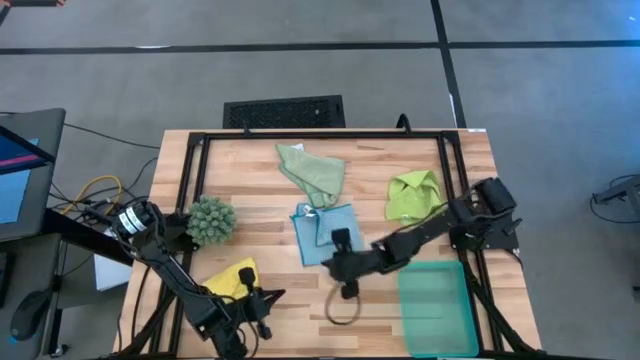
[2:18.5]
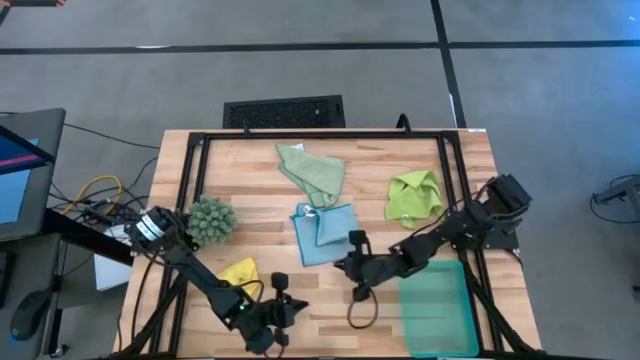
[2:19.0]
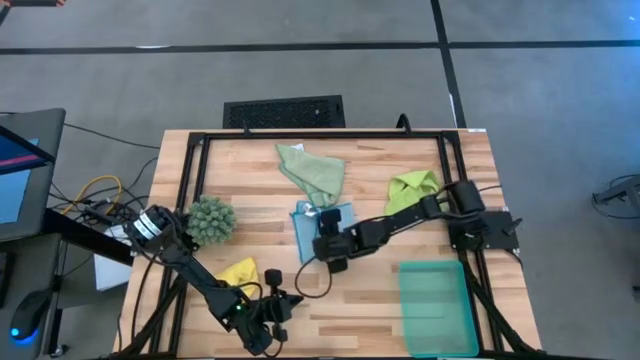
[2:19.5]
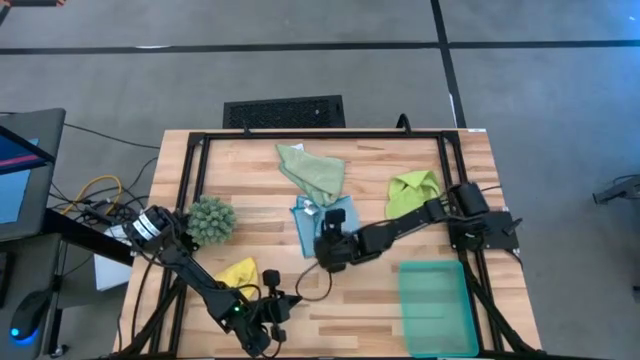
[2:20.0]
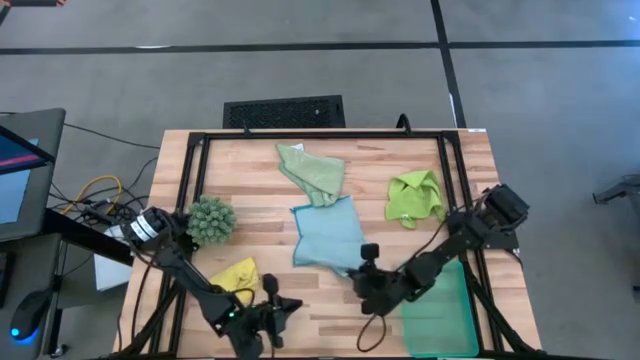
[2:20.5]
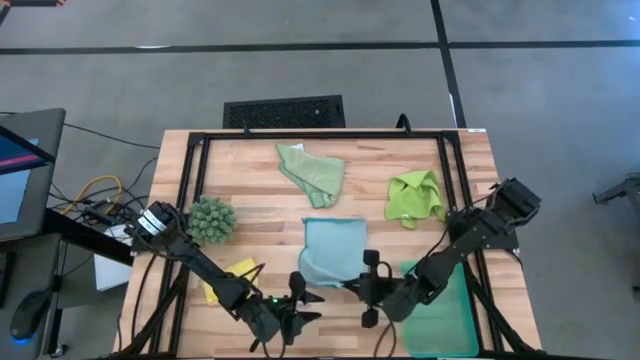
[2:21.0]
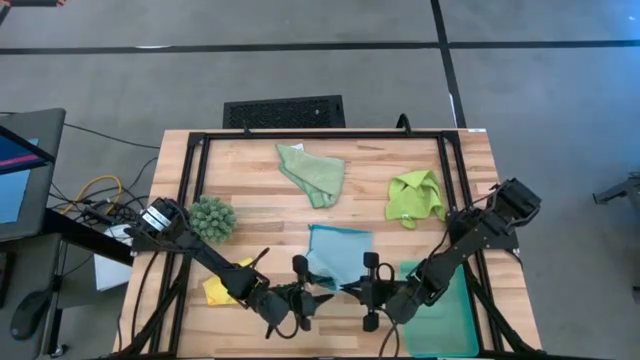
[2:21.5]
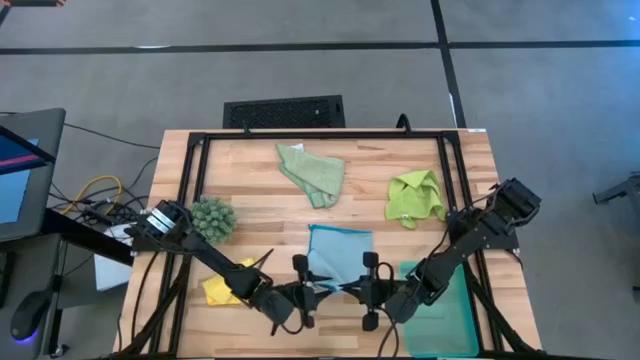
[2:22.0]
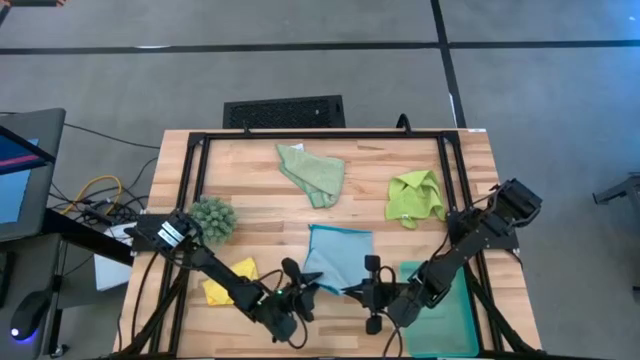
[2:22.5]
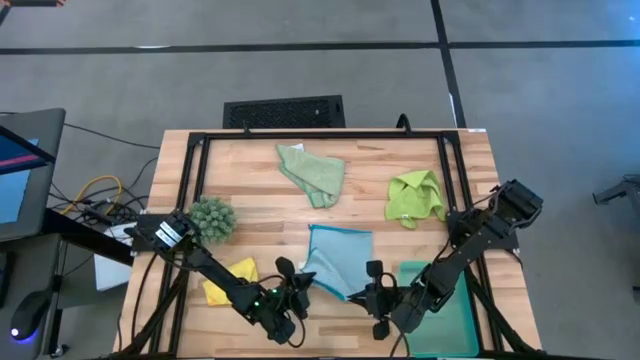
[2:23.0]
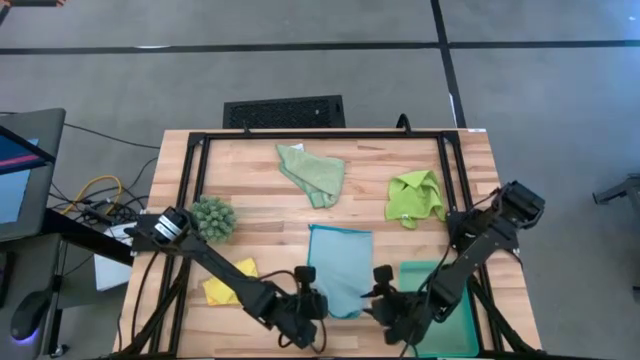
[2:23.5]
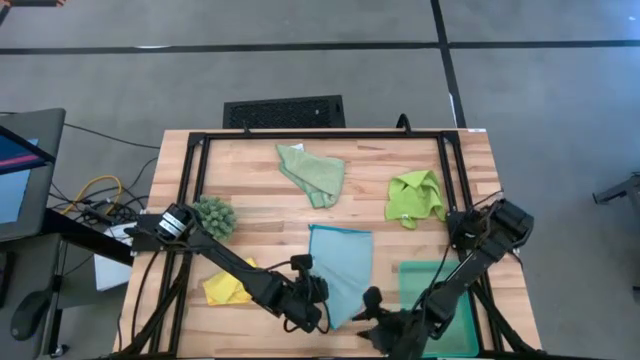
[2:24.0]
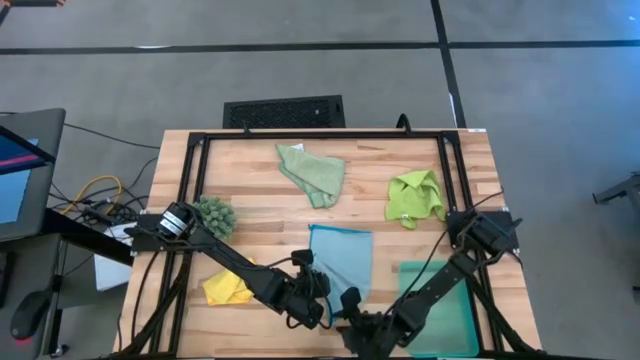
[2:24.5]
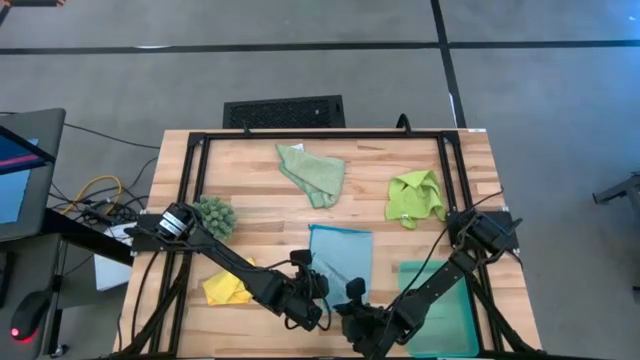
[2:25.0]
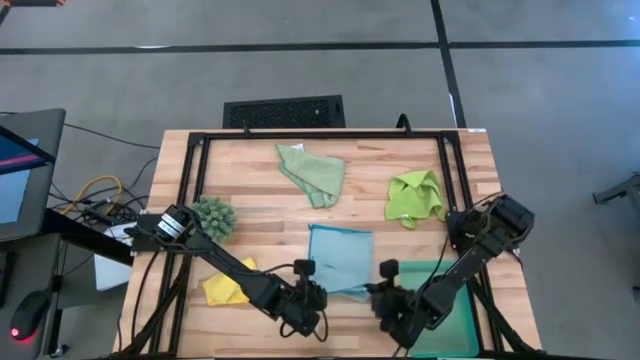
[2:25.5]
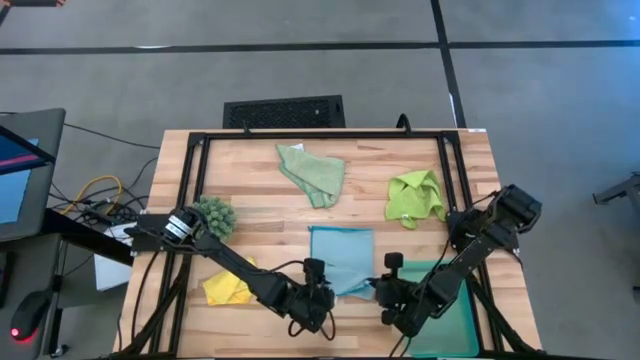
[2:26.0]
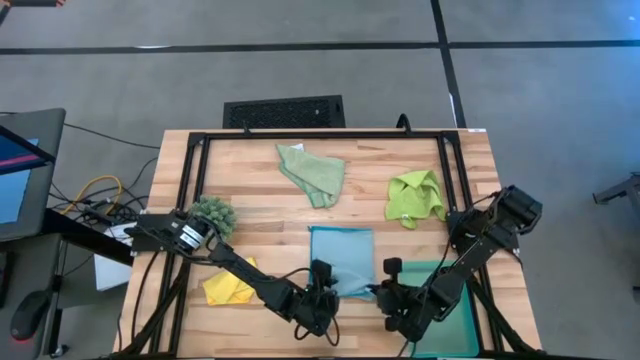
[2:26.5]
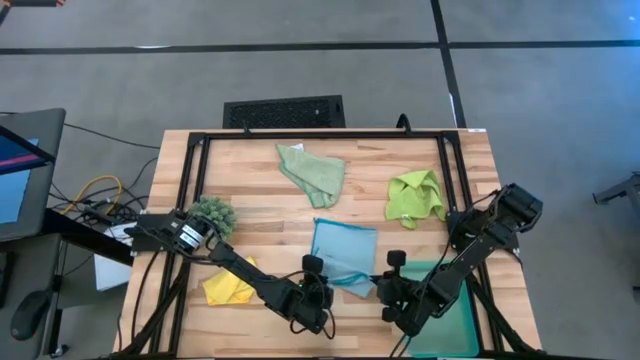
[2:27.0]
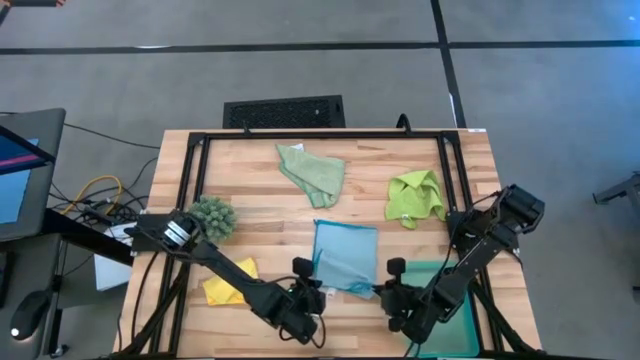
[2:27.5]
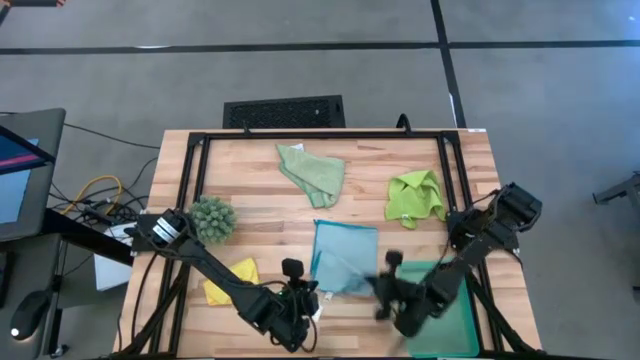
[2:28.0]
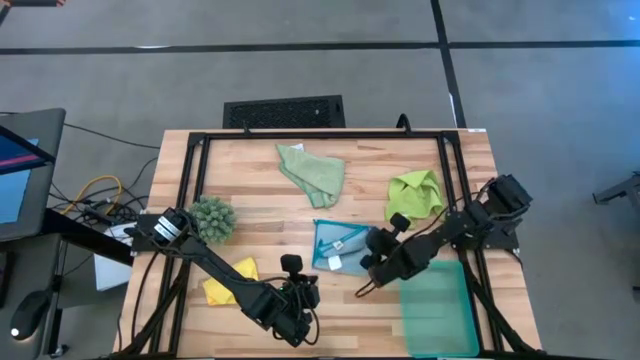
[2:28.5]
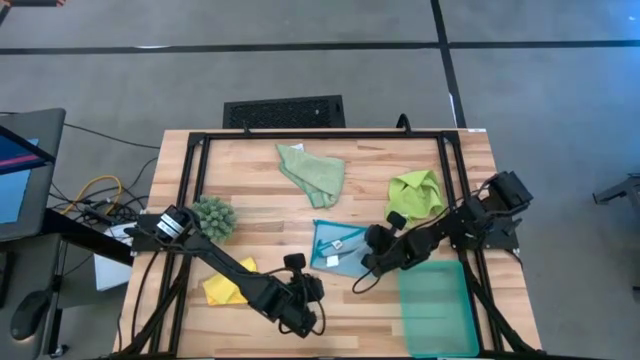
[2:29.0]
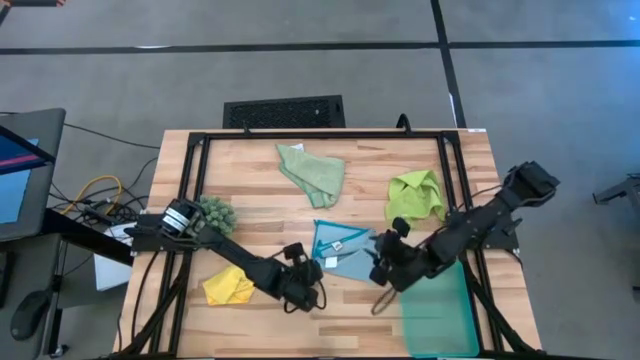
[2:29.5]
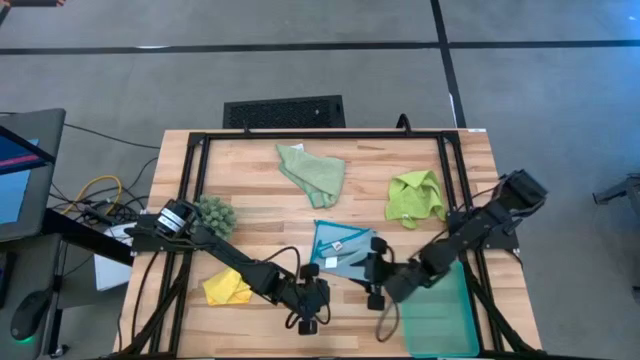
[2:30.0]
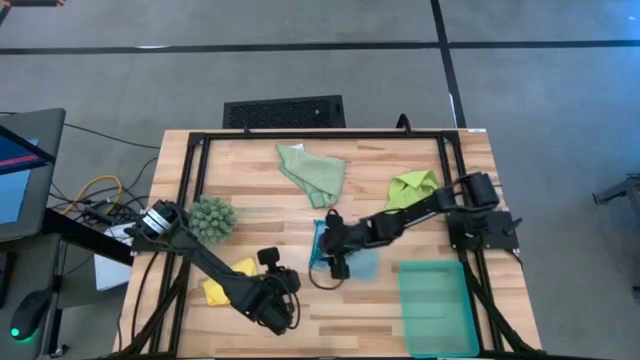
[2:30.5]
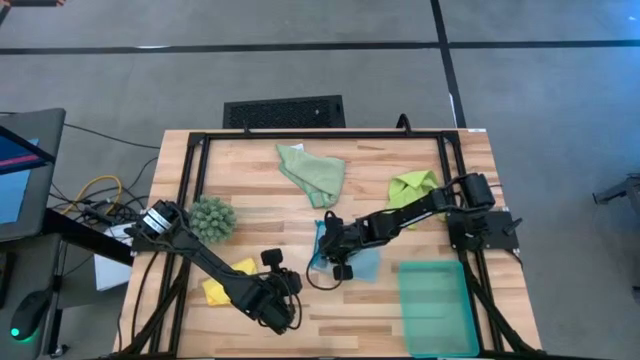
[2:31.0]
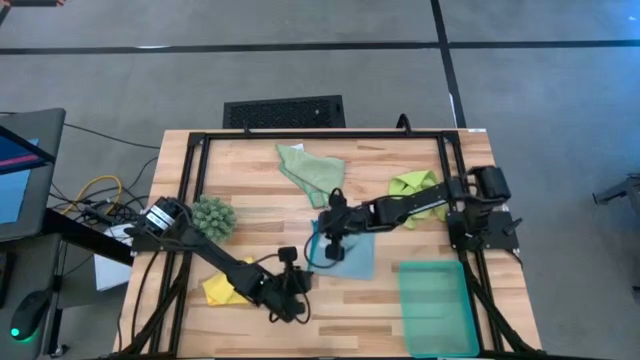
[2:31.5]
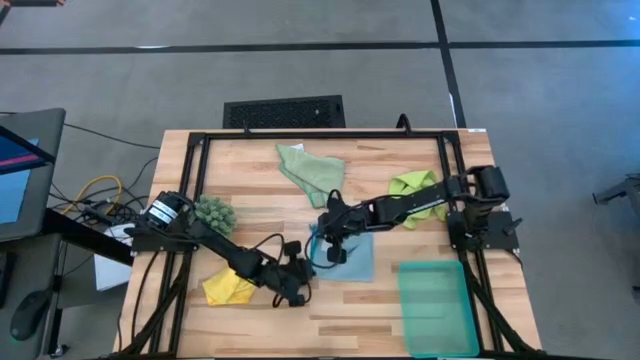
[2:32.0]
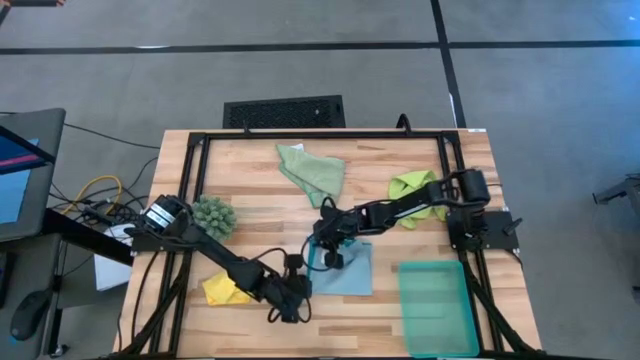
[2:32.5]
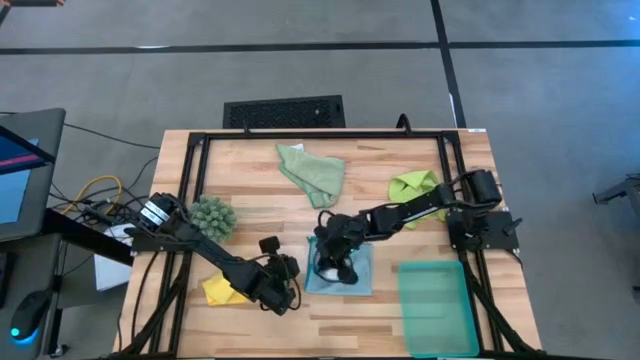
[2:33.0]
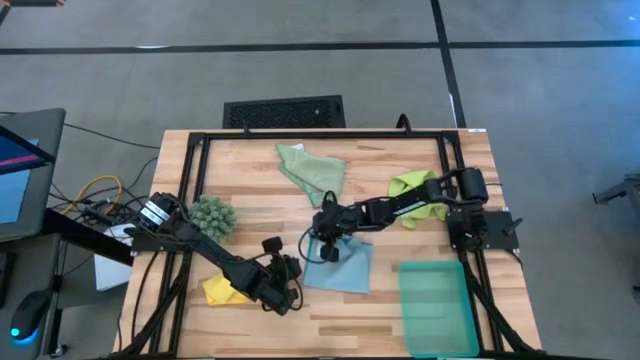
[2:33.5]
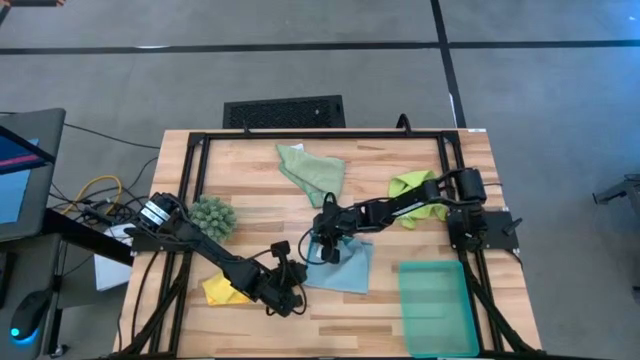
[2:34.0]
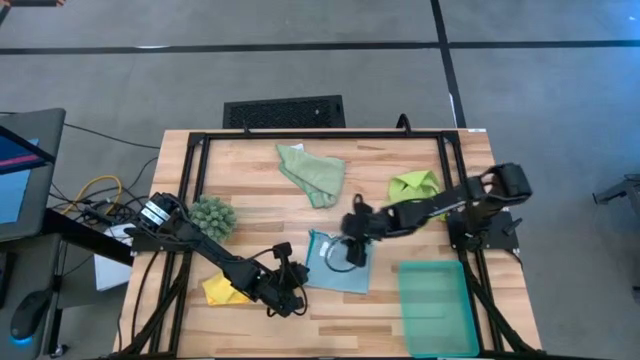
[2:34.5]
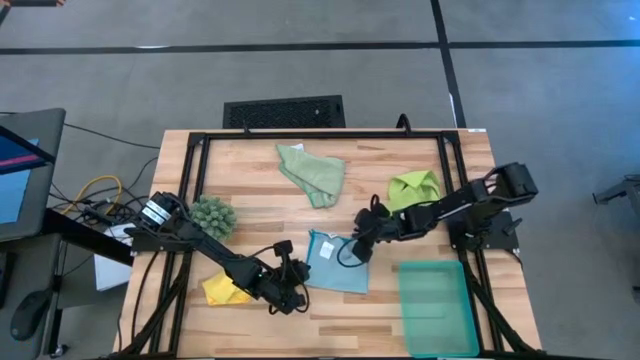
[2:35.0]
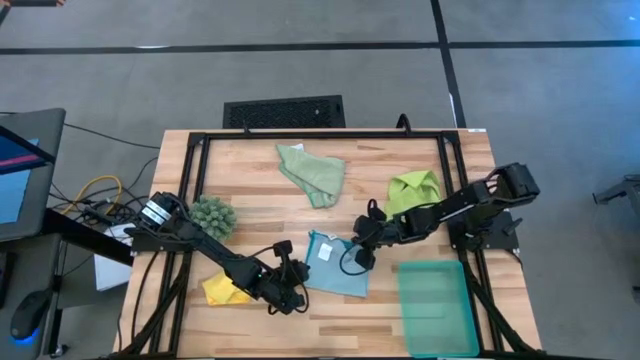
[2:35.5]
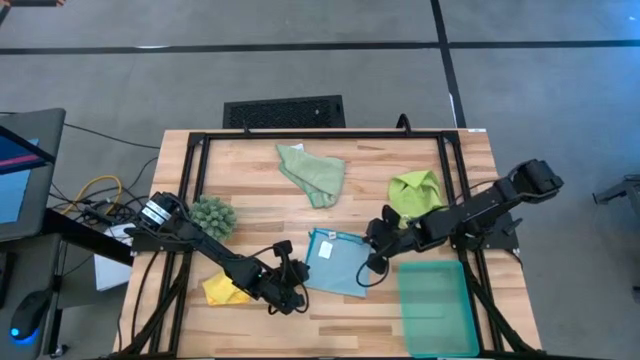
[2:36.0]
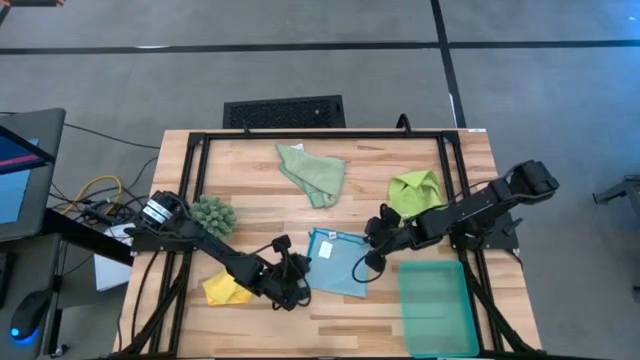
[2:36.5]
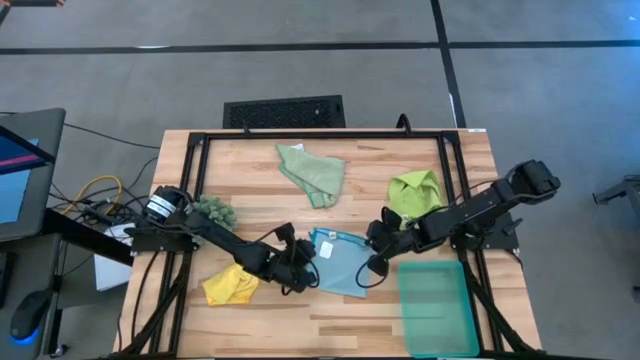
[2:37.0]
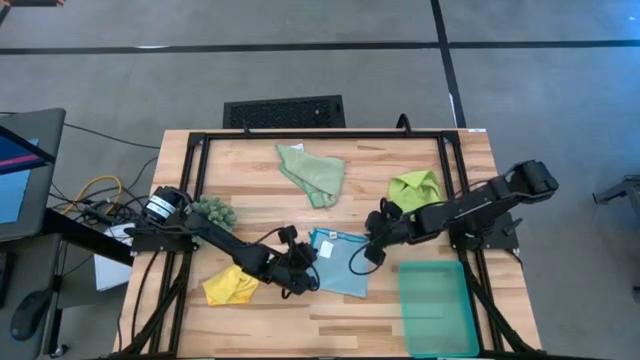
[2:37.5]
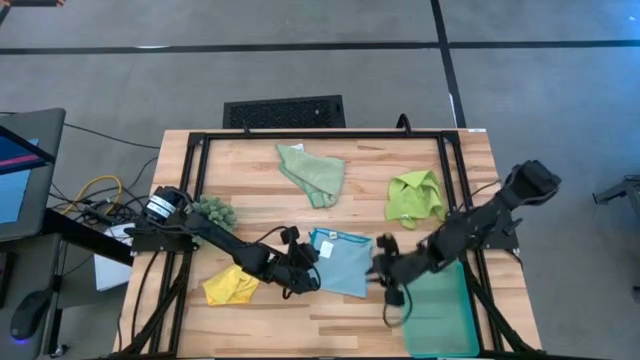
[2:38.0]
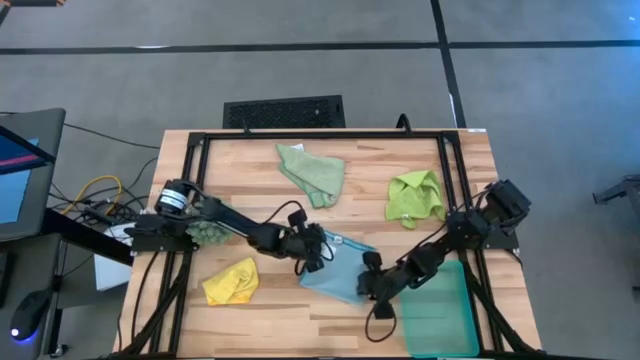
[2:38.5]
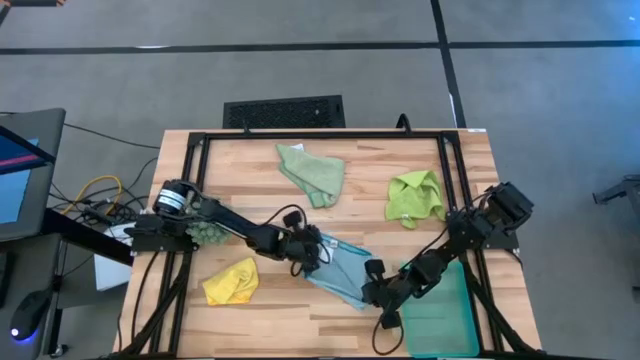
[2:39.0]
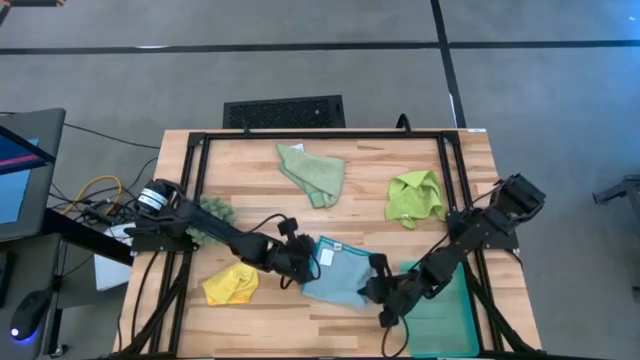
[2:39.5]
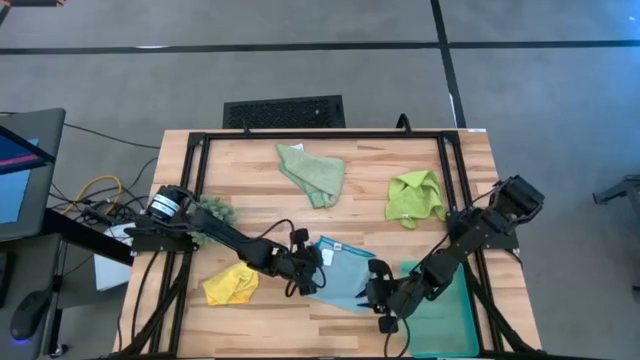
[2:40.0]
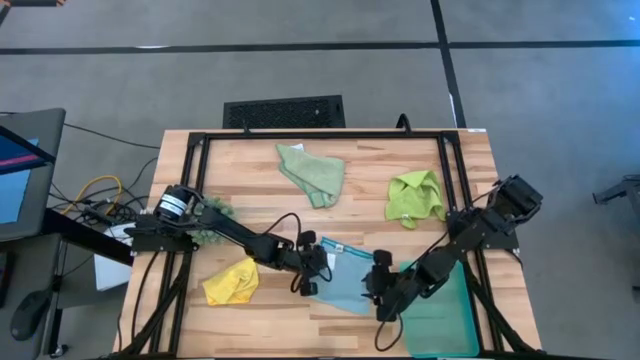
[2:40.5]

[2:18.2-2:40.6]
Task: Fold microfiber towels
Fold the blue microfiber cloth
